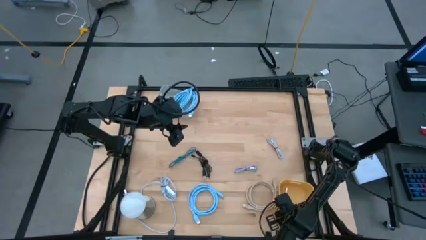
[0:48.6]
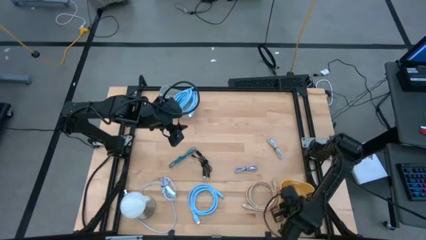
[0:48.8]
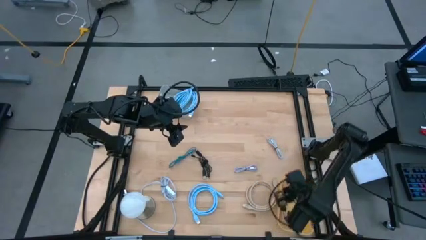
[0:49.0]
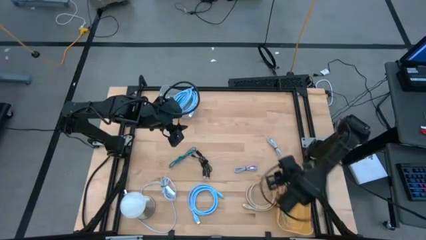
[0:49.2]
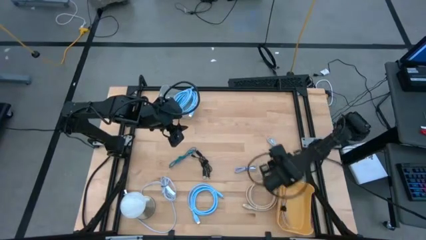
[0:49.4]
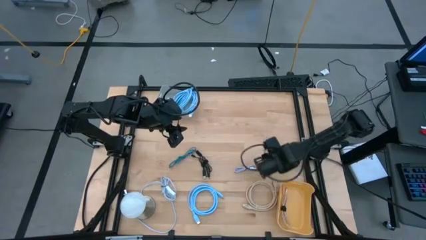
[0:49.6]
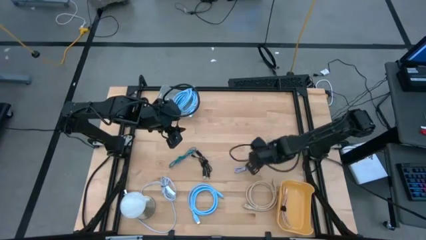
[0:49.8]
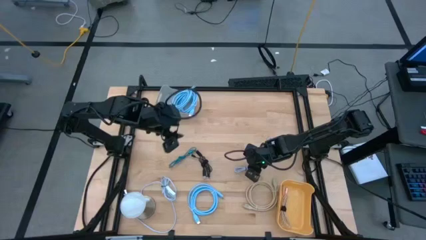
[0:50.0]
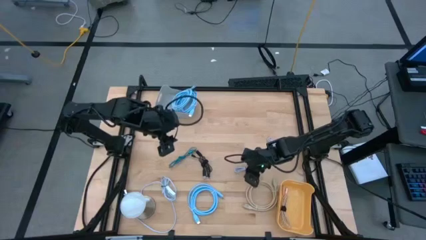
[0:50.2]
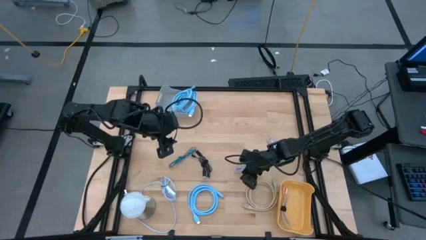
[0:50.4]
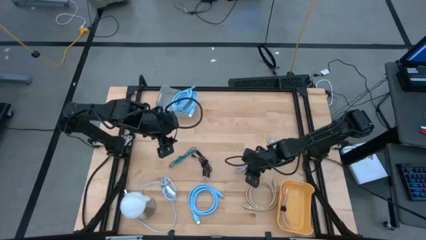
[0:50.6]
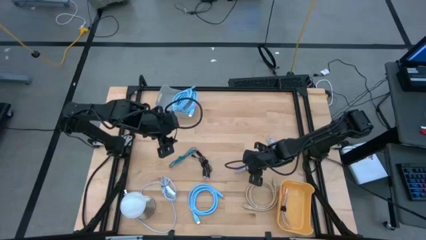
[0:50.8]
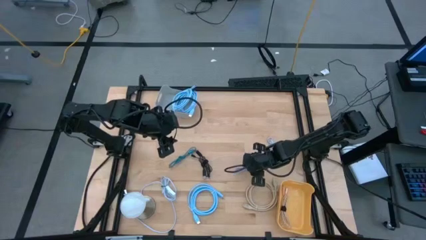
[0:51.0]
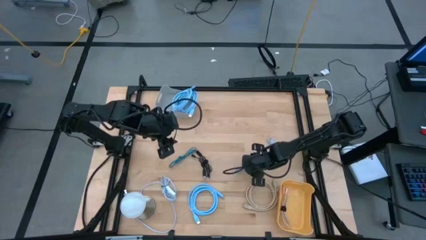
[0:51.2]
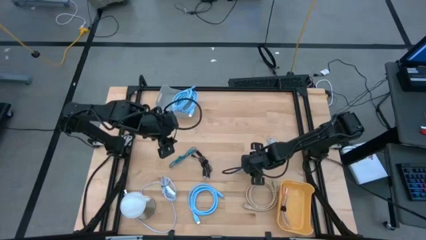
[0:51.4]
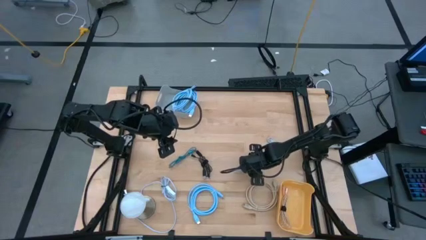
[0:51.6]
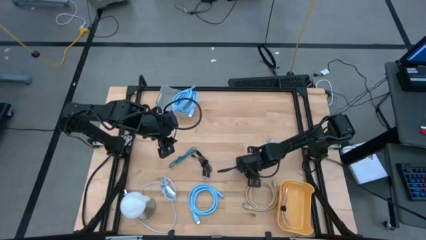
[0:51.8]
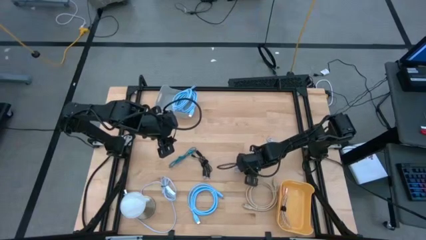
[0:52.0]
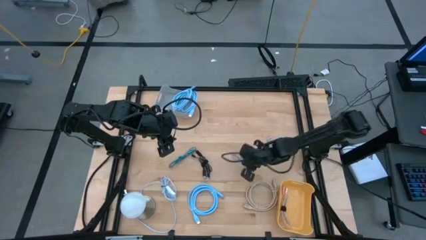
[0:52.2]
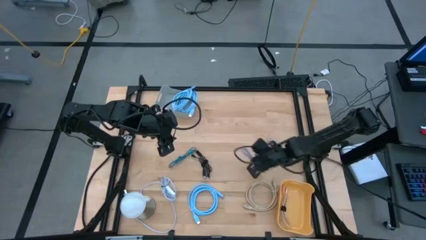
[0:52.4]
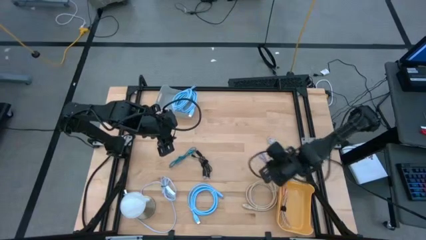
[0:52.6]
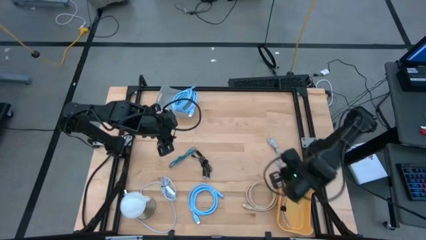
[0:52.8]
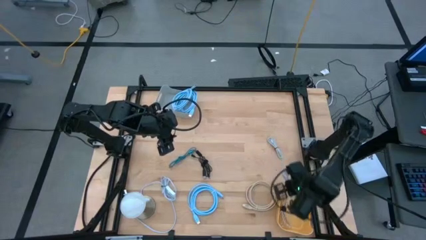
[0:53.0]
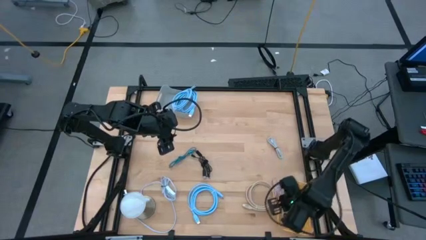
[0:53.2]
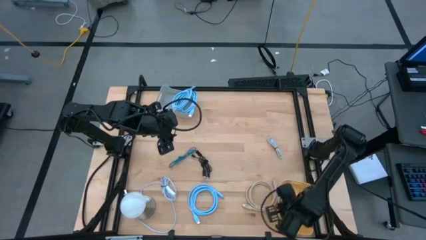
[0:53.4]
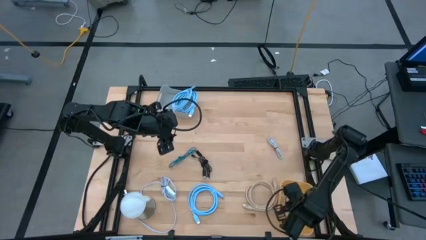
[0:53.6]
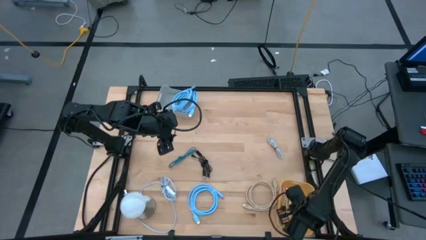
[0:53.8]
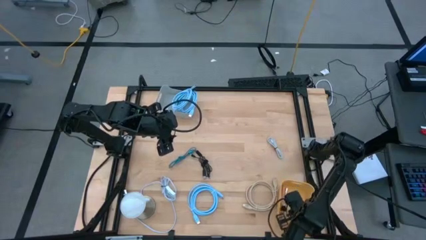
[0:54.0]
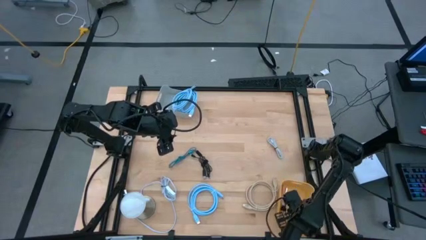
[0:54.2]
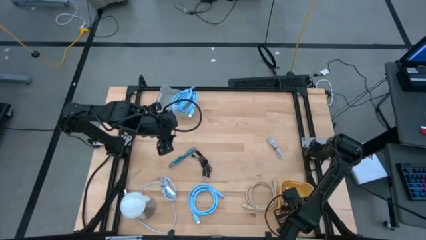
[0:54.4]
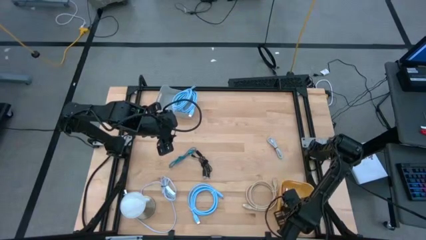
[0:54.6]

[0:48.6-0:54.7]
Task: Pick & Place USB Port
Put the purple charger cable into the yellow bin

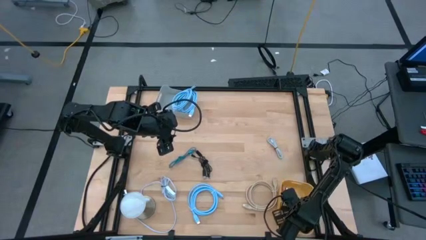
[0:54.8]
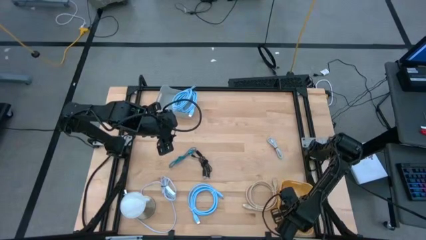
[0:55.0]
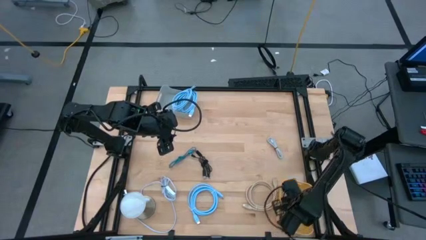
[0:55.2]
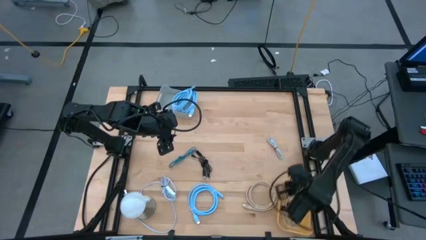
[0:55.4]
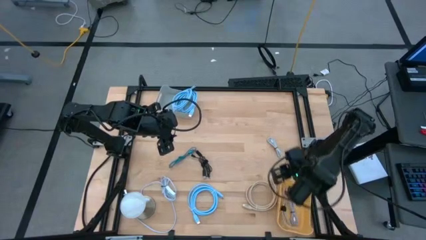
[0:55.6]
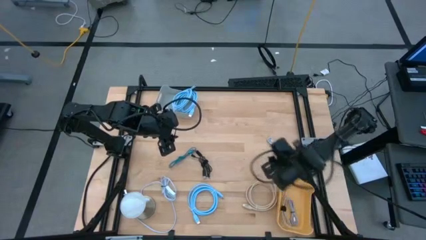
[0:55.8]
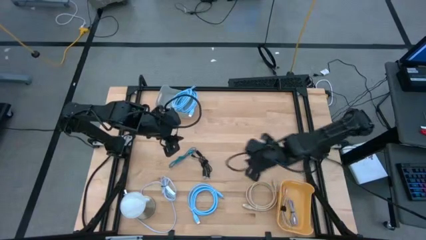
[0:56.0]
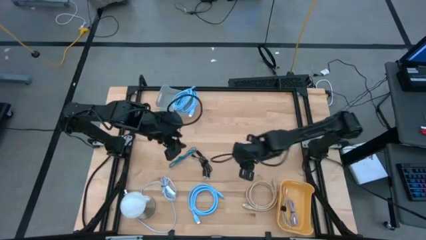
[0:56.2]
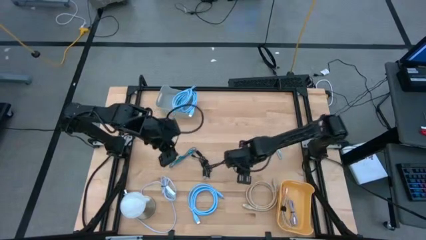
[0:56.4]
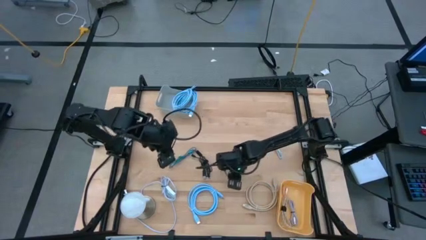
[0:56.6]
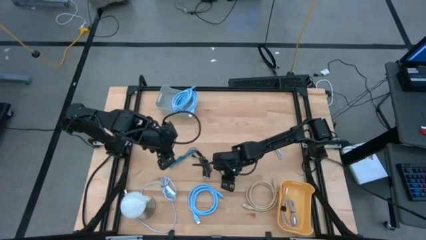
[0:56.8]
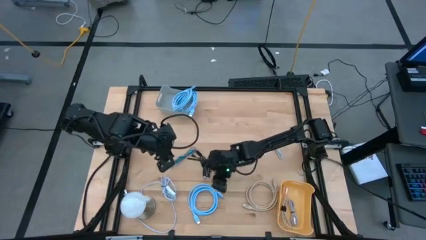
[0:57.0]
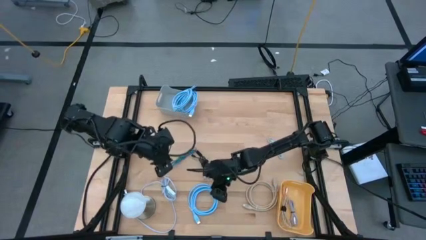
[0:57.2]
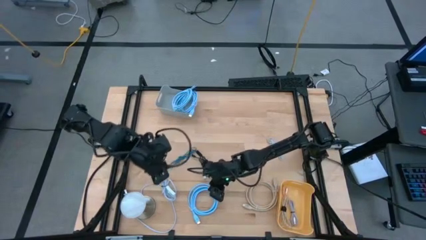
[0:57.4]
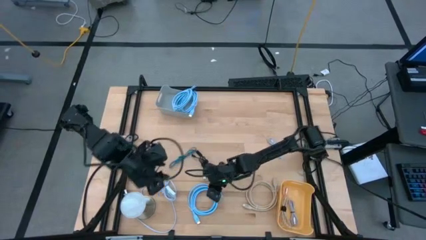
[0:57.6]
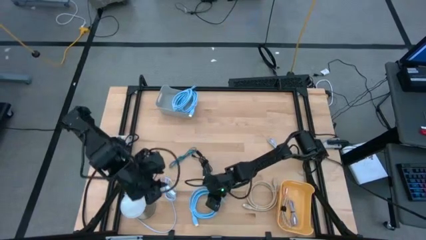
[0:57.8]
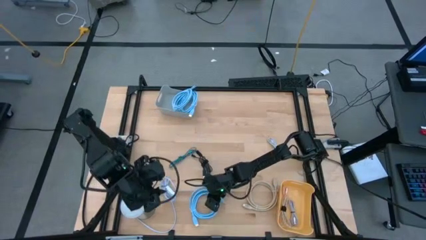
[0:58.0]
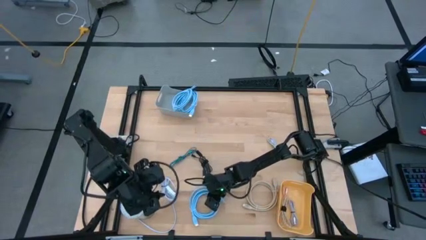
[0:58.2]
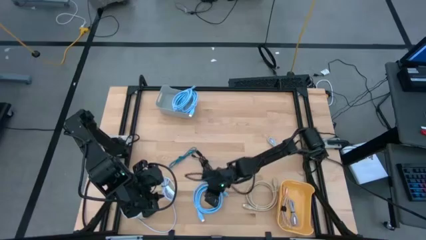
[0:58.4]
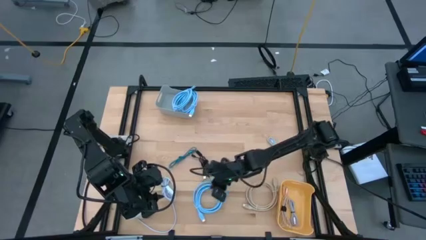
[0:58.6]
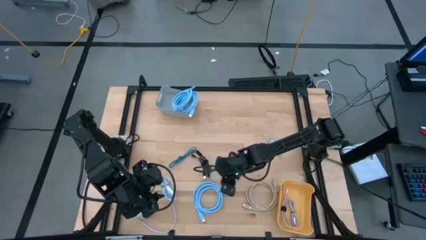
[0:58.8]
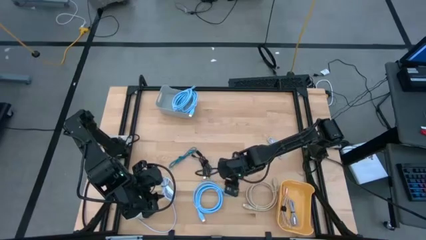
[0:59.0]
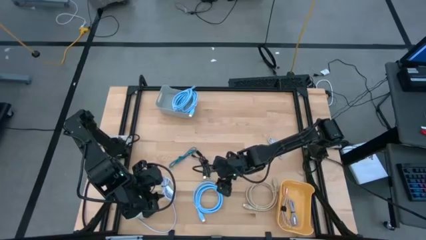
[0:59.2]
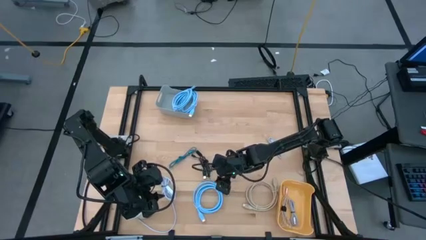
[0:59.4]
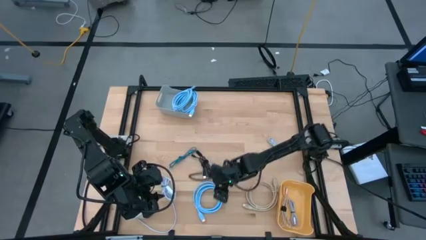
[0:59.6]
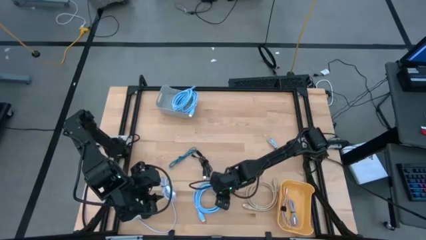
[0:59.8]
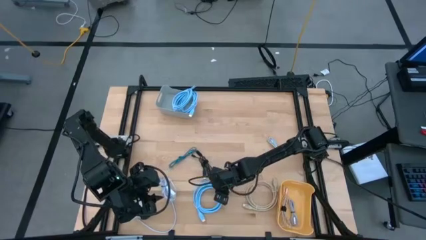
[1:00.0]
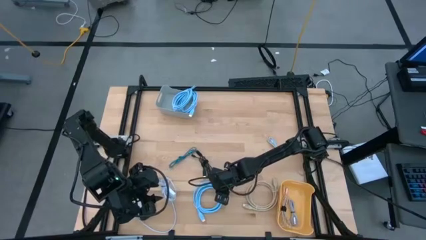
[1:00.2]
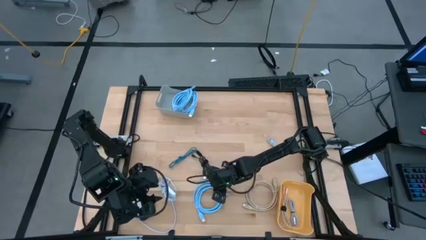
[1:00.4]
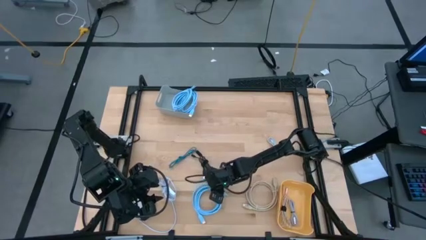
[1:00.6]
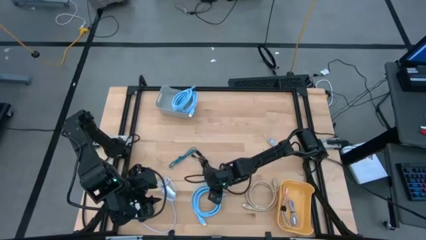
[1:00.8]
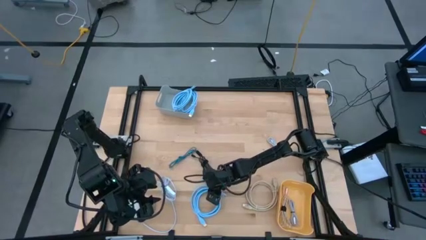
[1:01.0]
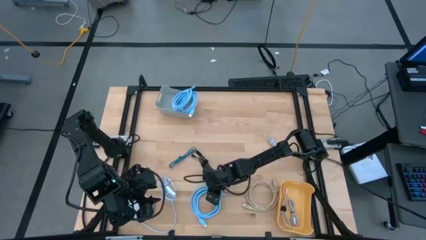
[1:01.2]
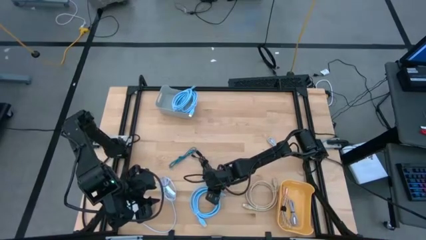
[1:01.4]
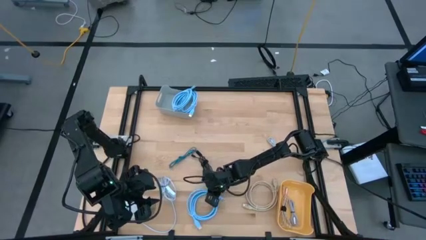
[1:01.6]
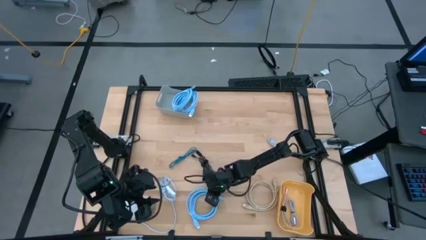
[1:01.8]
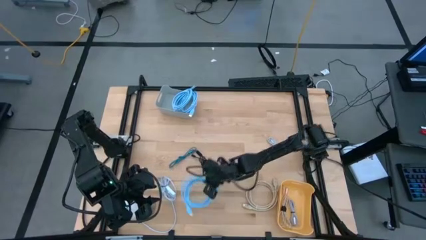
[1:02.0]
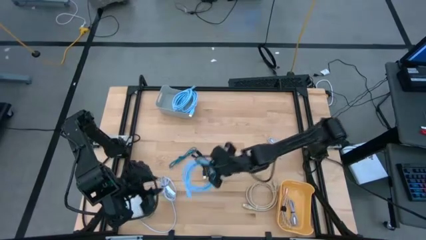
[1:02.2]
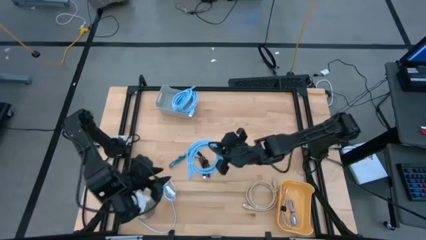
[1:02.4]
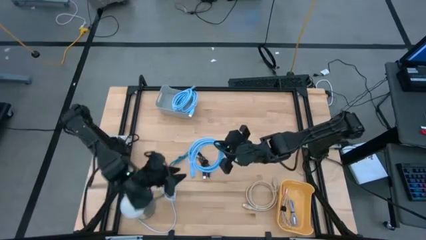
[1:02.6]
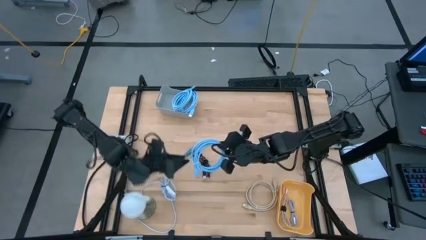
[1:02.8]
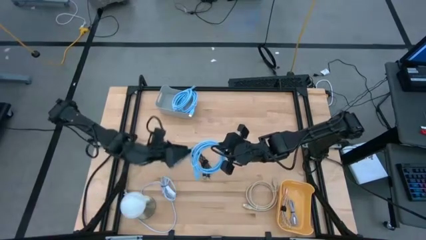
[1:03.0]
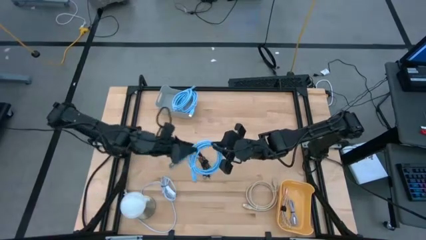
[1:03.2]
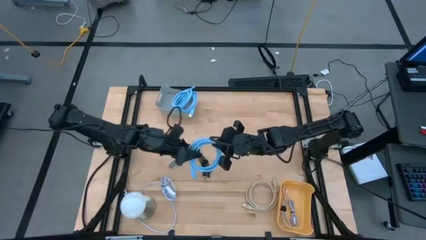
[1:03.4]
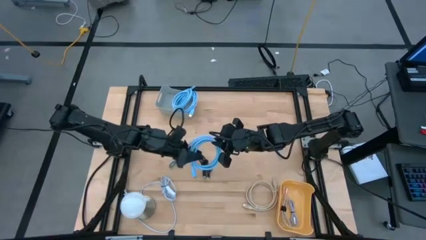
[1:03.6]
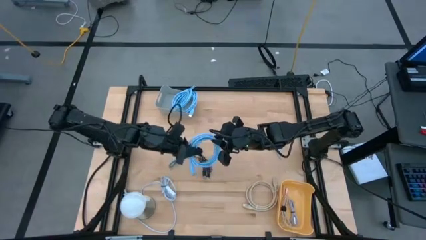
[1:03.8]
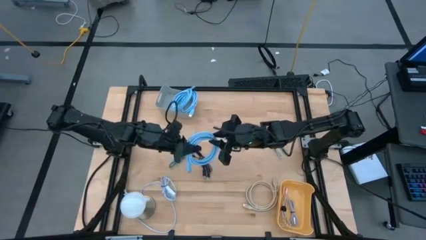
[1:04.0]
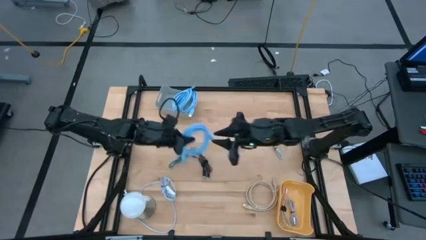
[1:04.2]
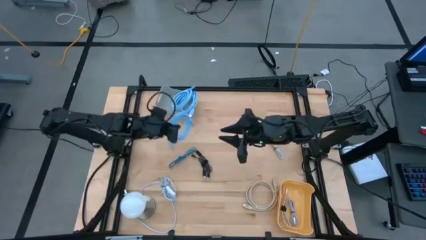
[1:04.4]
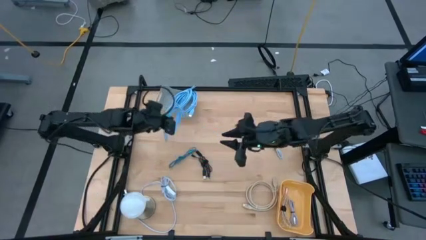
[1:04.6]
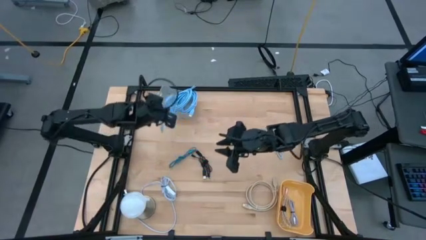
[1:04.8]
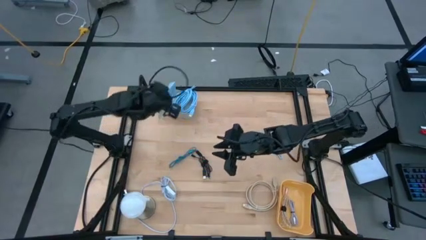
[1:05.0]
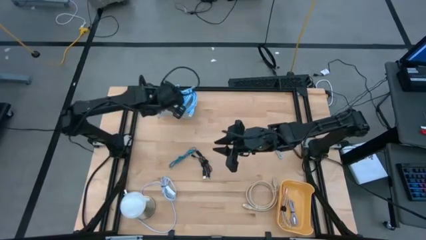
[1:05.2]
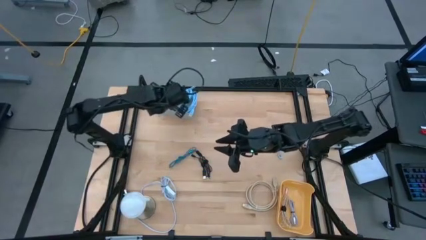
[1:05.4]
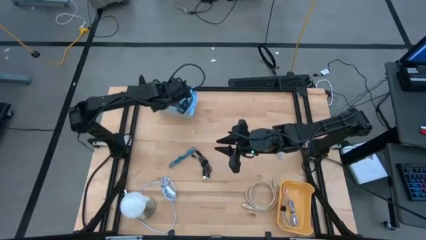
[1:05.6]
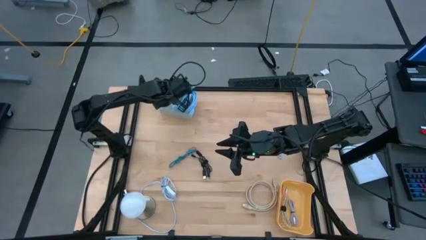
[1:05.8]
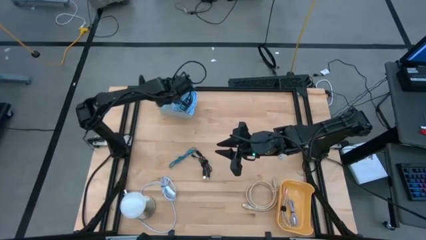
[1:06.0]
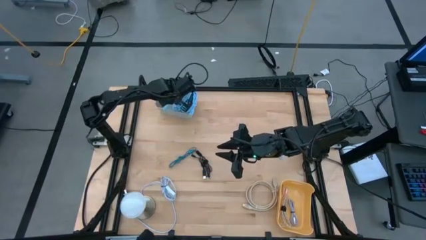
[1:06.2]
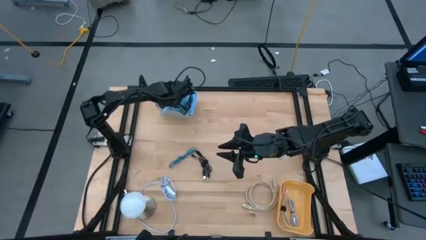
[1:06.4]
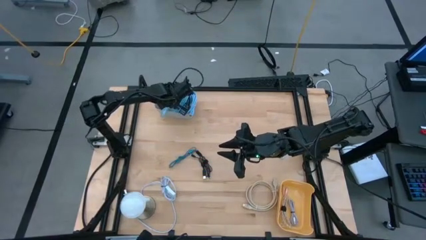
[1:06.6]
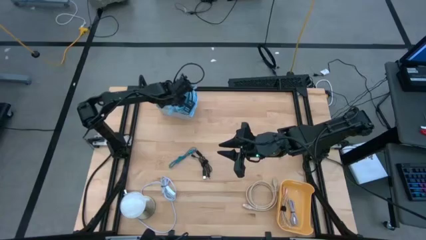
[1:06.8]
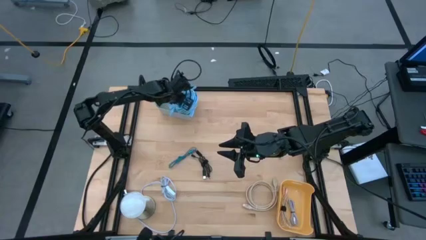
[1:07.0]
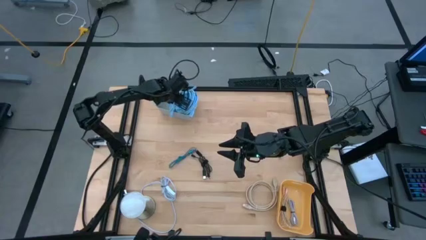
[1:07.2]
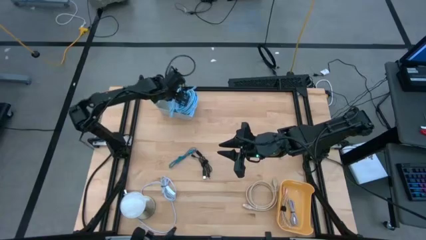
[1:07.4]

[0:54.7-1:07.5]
Put the blue HDMI cable into the gray bin
